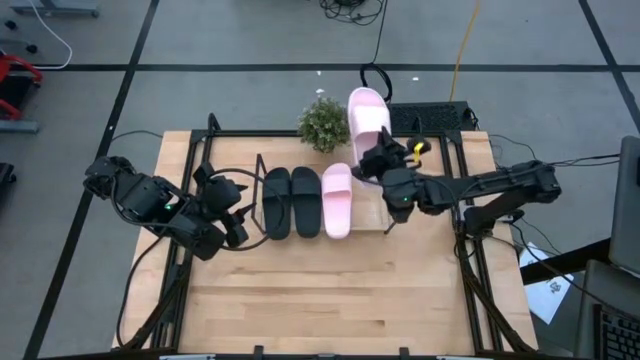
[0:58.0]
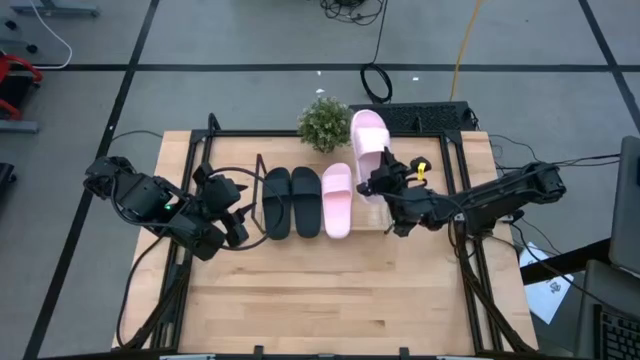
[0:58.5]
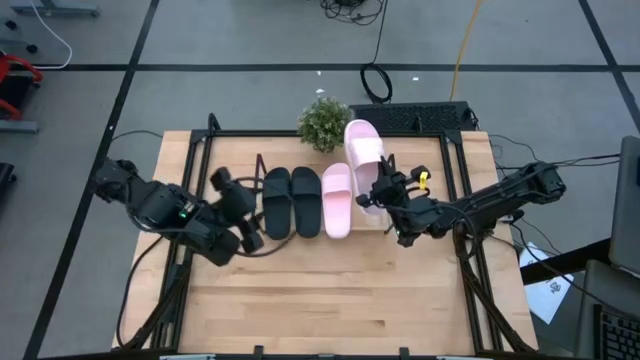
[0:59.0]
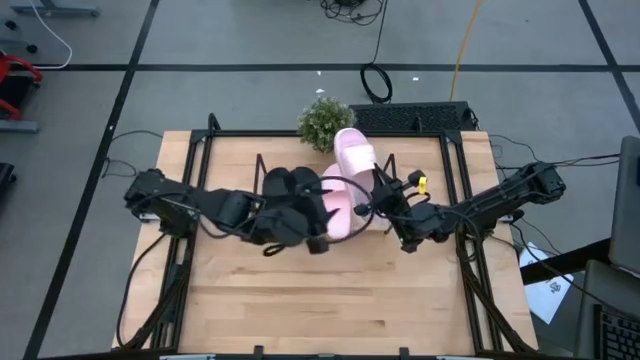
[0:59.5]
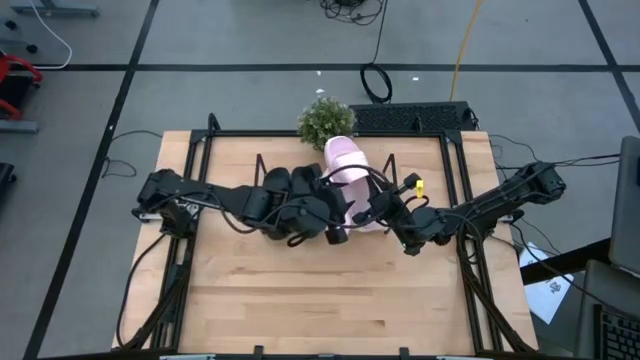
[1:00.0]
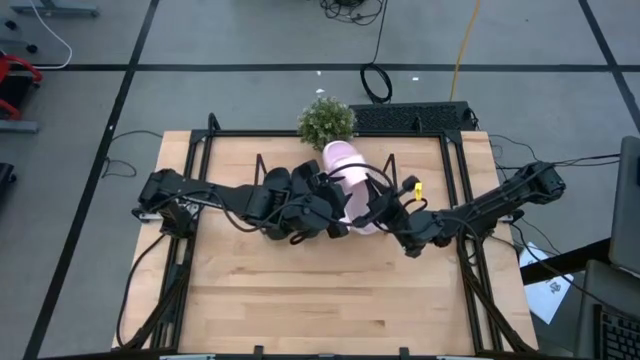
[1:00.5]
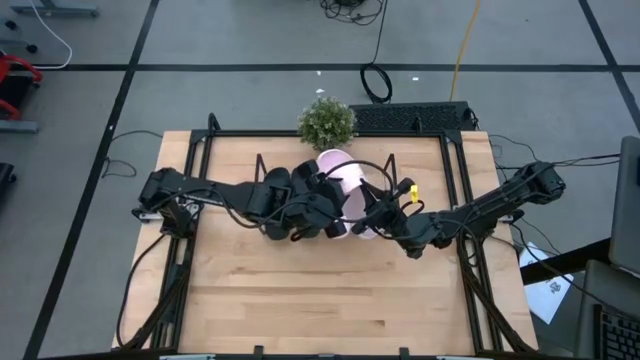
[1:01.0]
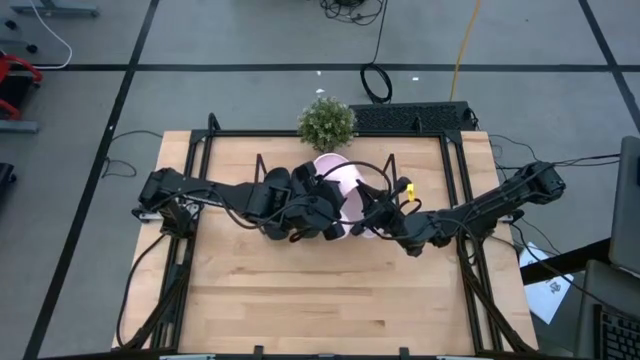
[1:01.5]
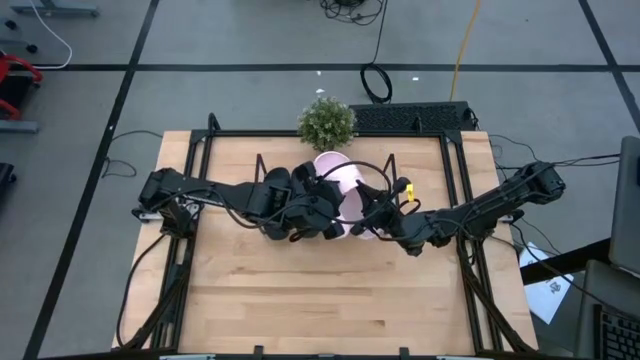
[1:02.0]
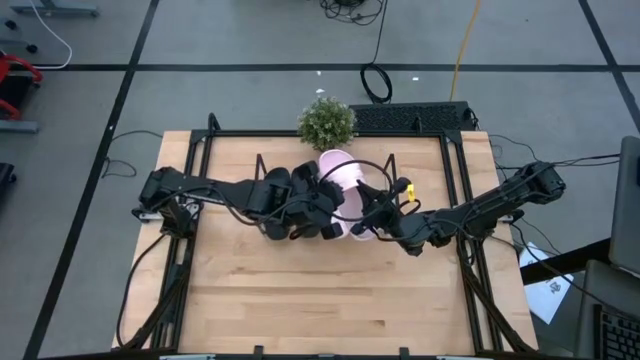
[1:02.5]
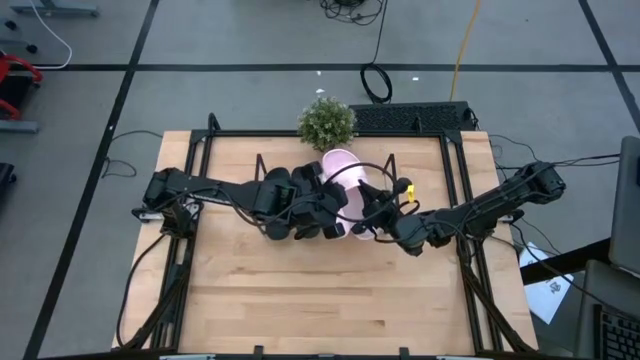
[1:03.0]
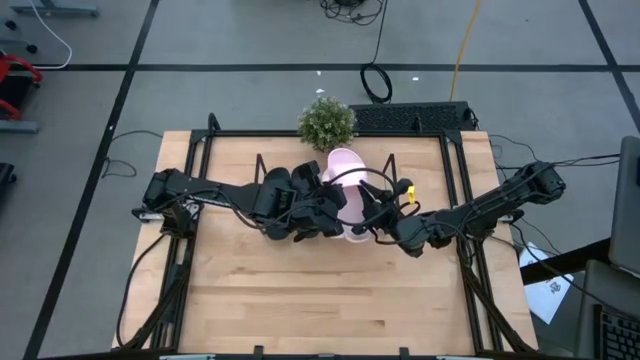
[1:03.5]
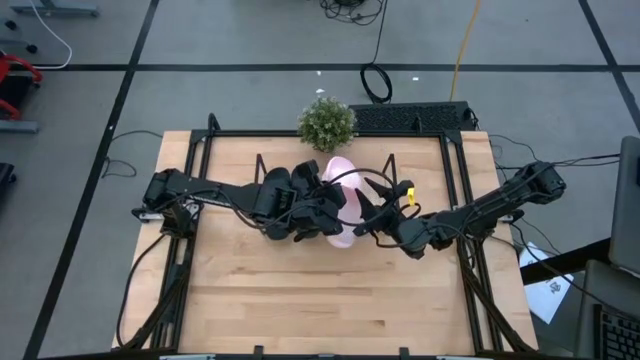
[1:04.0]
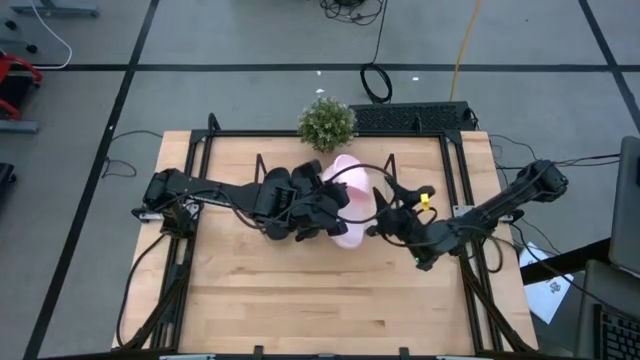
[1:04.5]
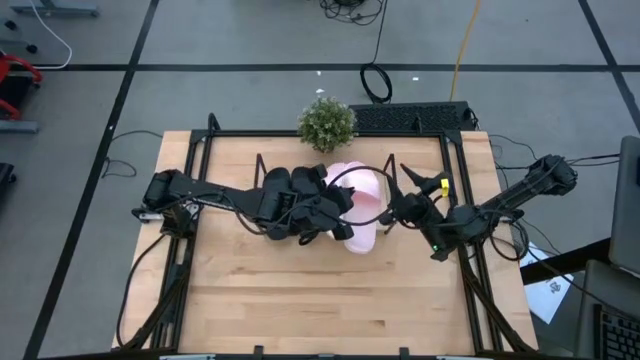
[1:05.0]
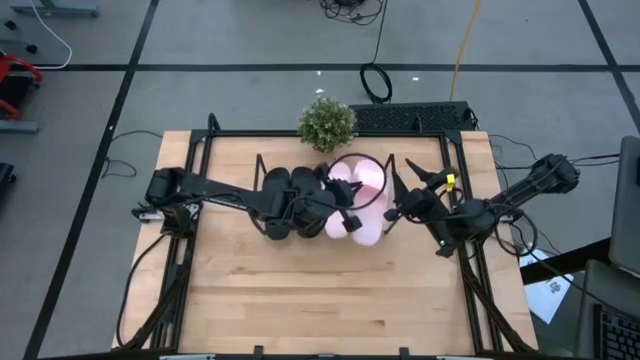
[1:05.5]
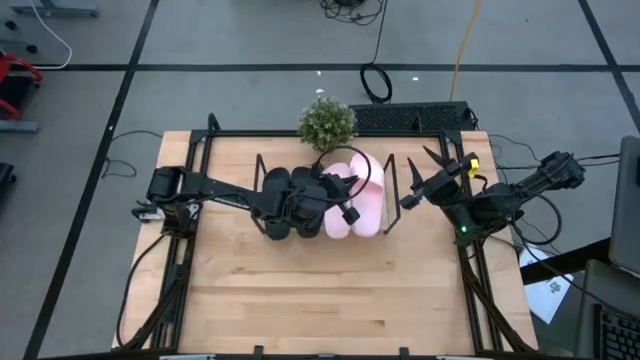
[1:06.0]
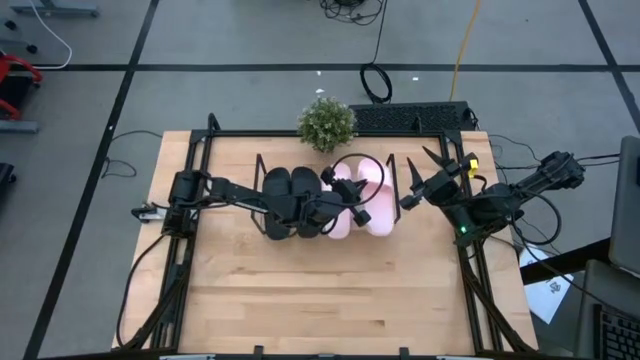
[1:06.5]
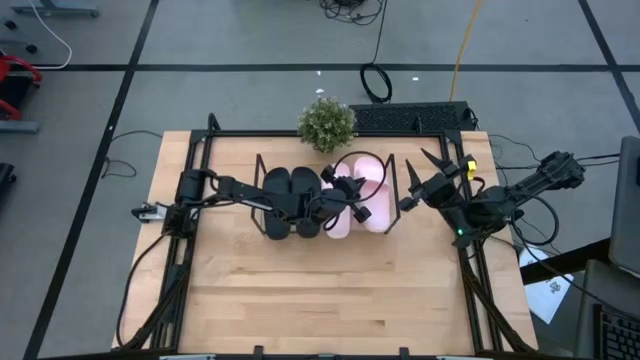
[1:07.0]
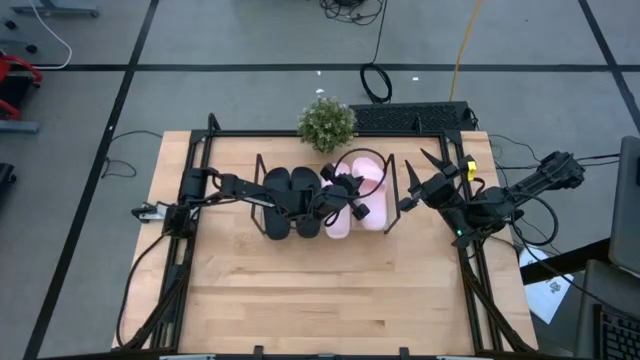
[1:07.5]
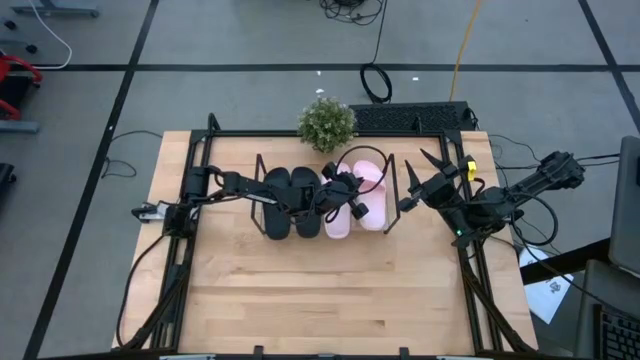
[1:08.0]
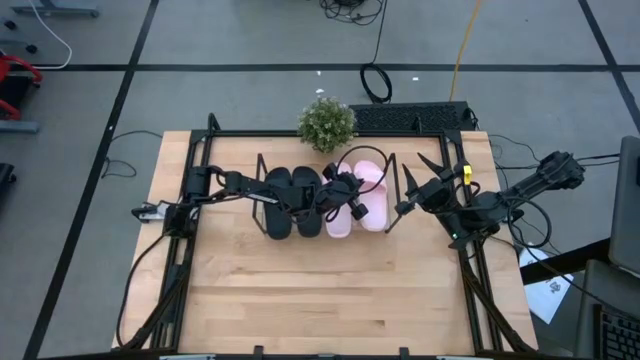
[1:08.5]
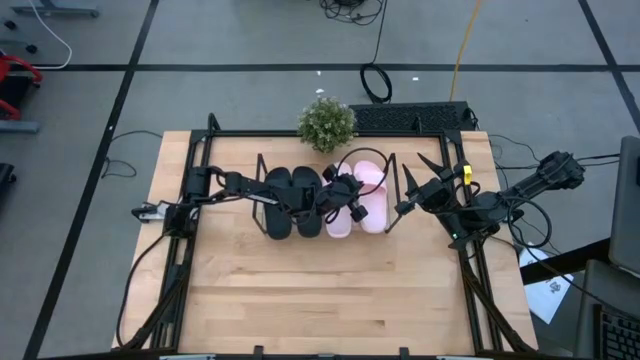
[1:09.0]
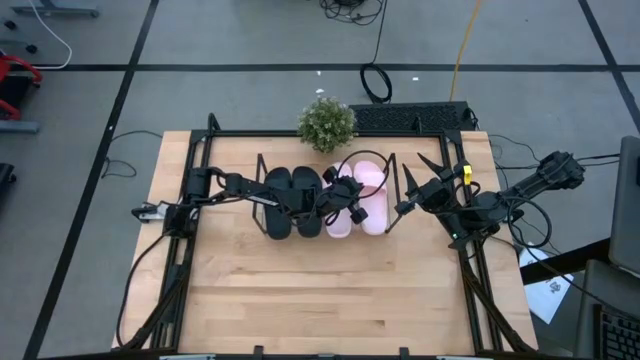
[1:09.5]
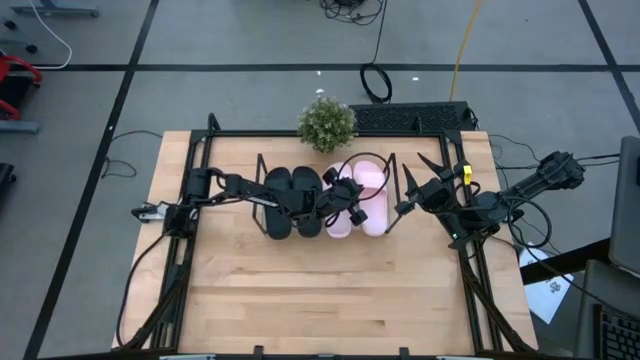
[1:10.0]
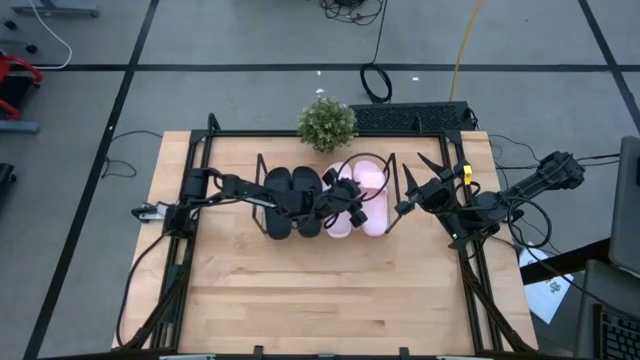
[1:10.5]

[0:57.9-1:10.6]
Task: Pick and place slides into the shelf
Put the pink slide on the shelf

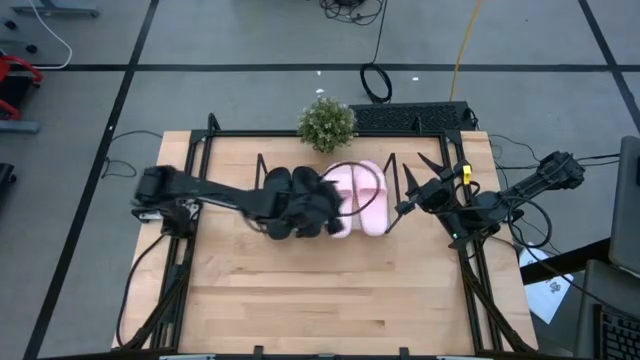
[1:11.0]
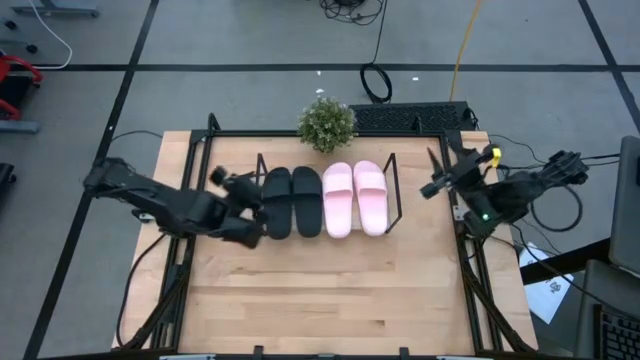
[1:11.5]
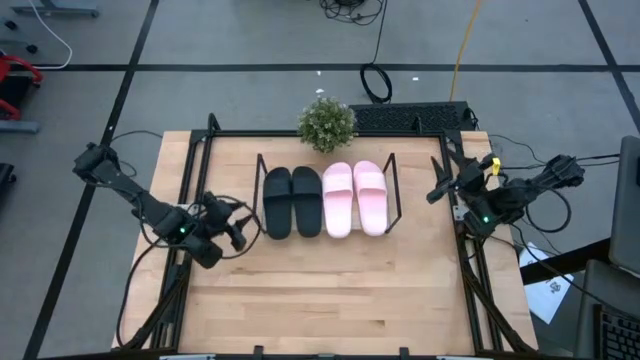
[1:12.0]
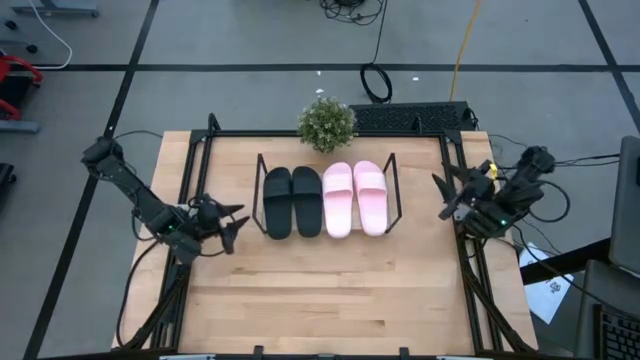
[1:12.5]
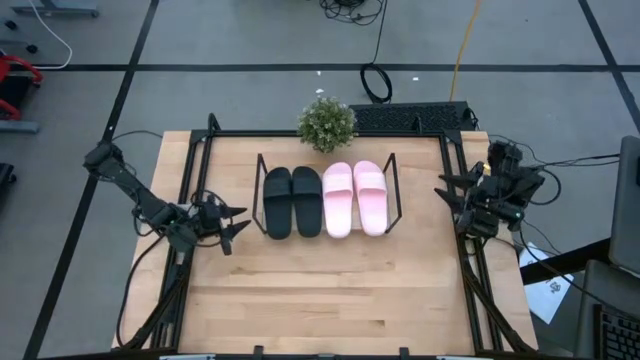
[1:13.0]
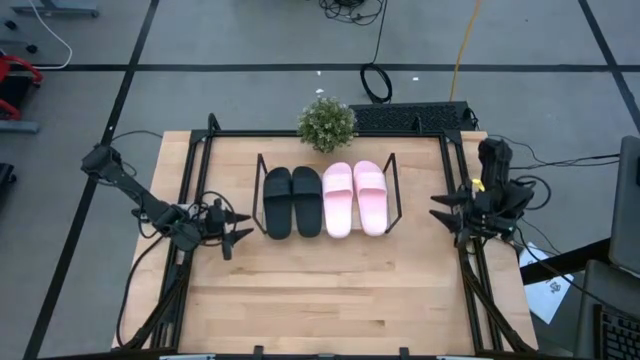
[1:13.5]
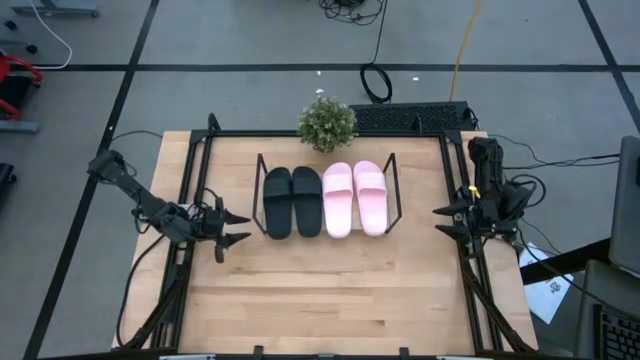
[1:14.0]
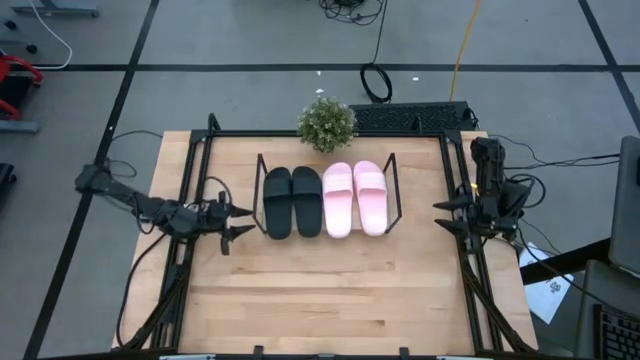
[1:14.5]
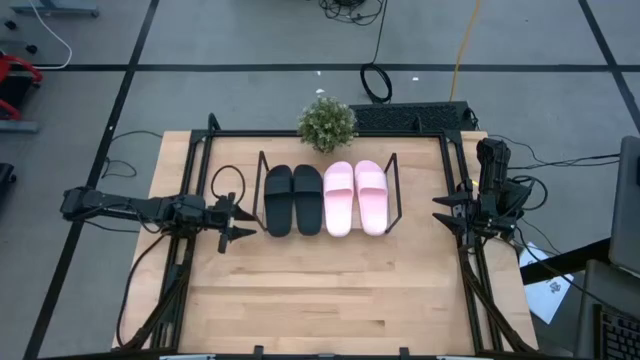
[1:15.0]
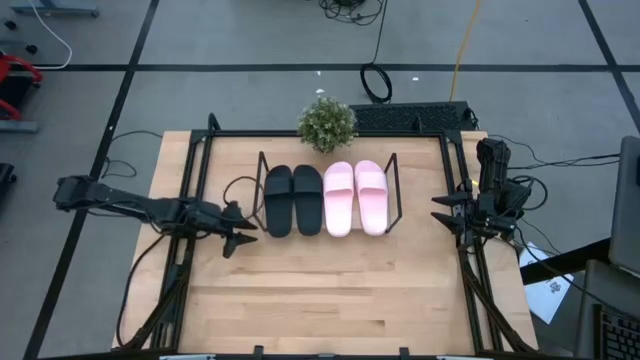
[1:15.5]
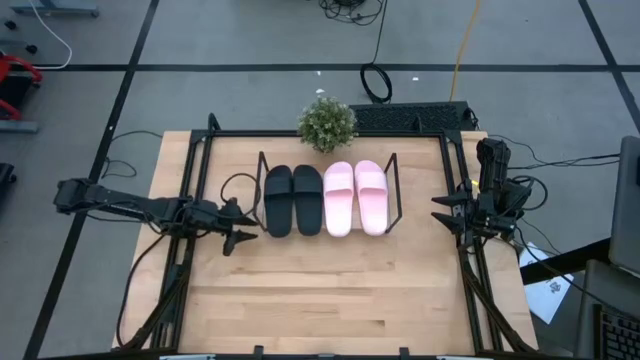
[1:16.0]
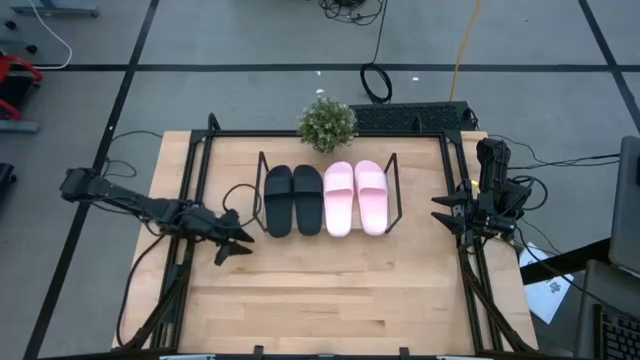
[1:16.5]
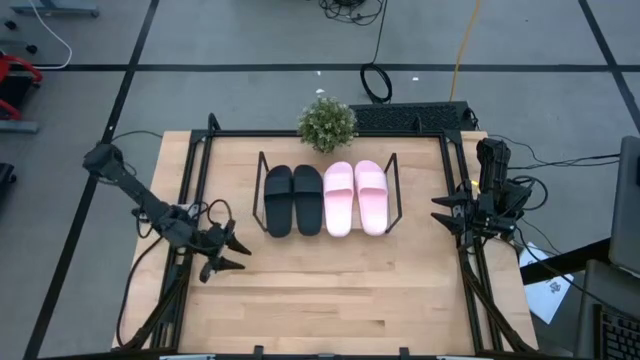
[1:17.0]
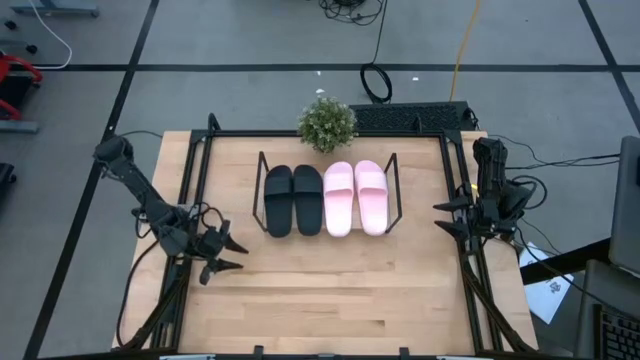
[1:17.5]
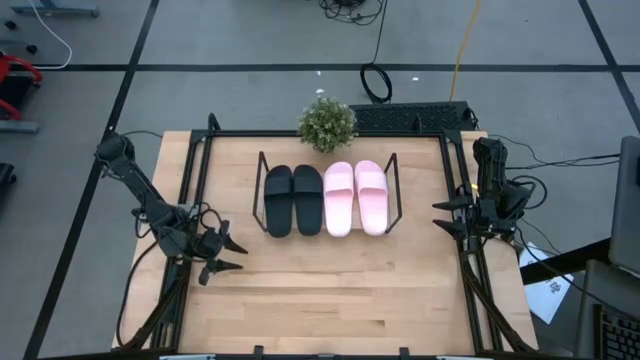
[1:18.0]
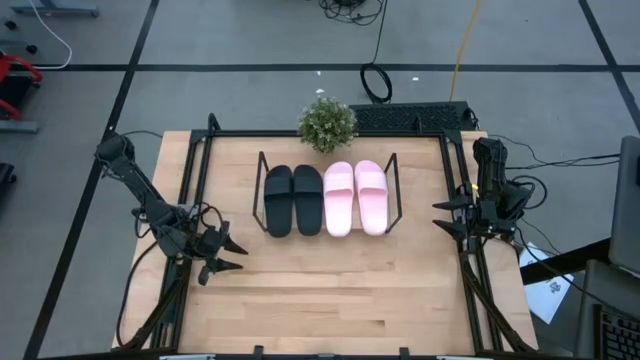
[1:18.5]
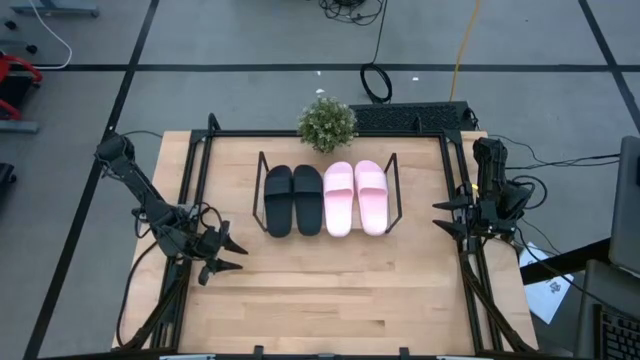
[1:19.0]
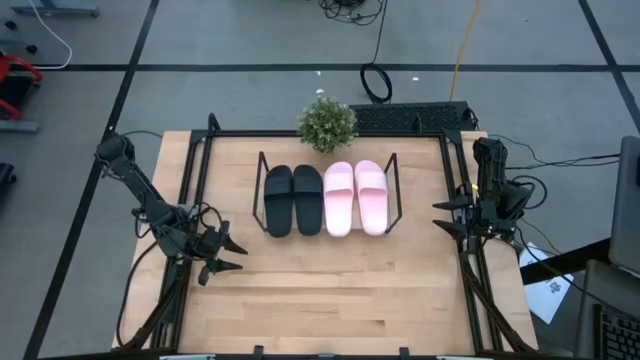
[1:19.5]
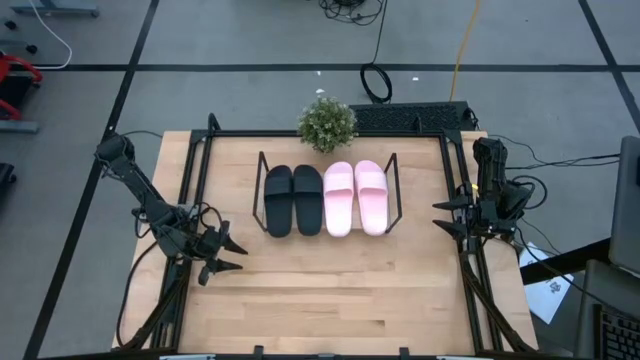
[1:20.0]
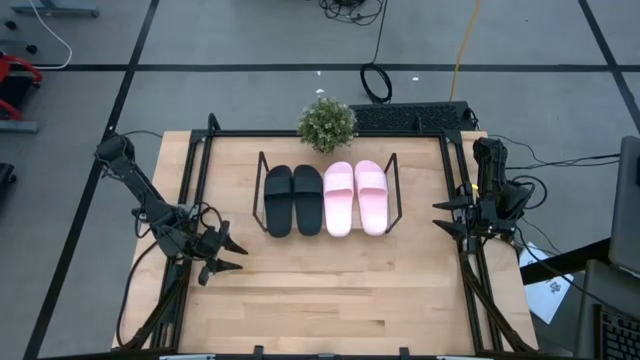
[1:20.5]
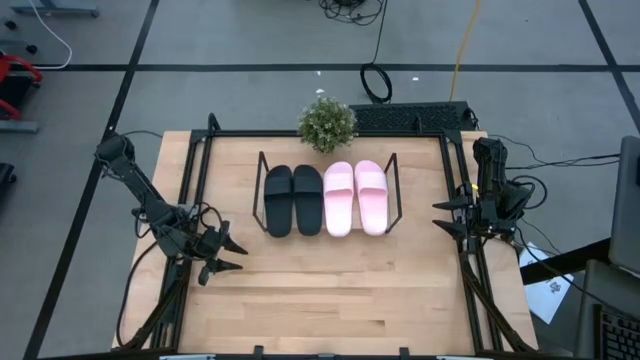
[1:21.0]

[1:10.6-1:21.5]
Return to Home Position
